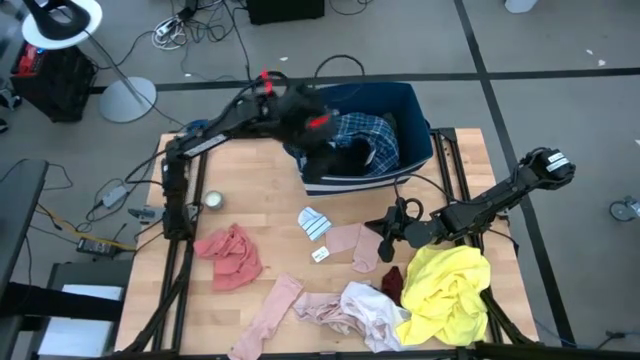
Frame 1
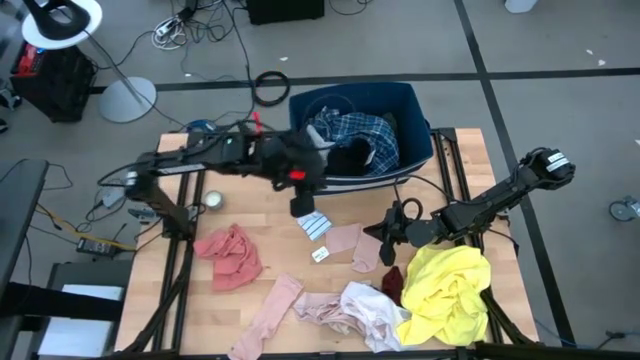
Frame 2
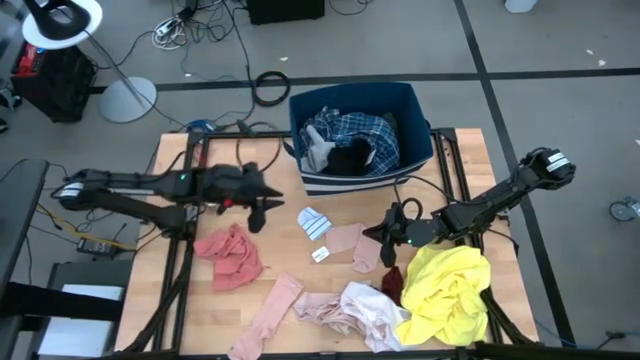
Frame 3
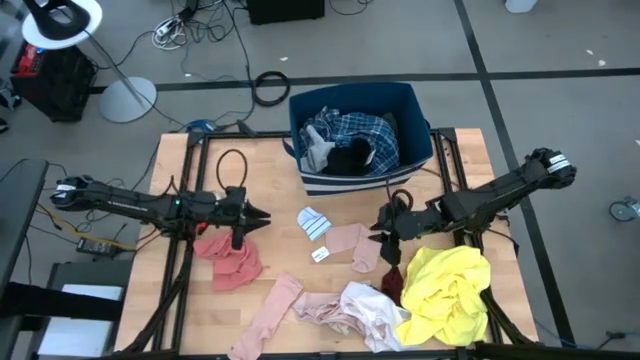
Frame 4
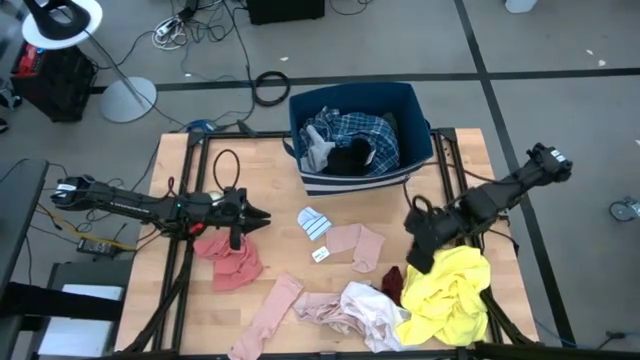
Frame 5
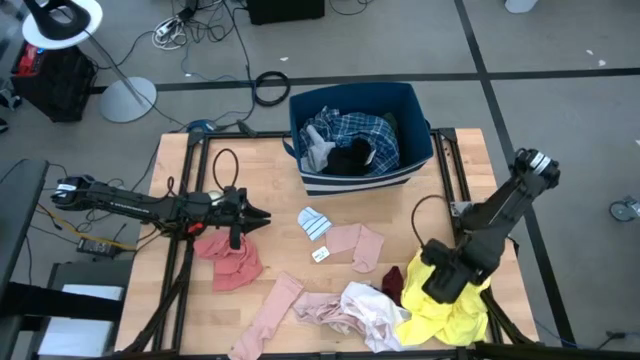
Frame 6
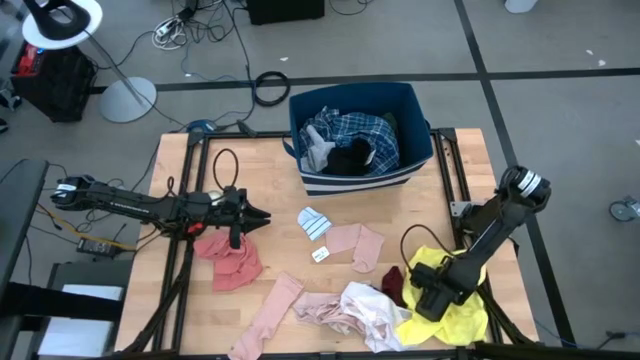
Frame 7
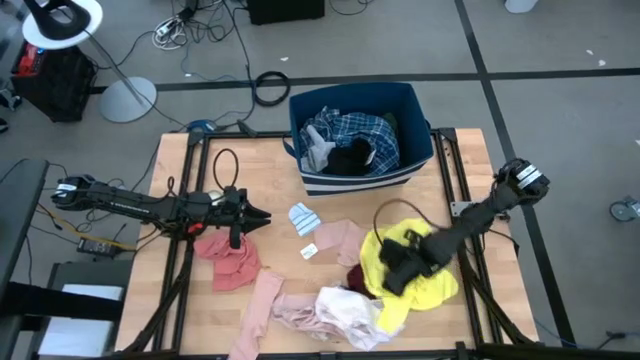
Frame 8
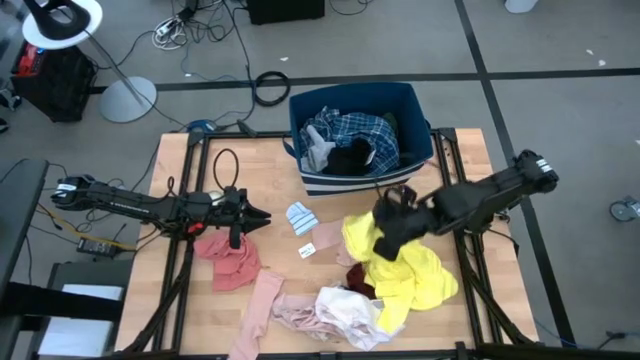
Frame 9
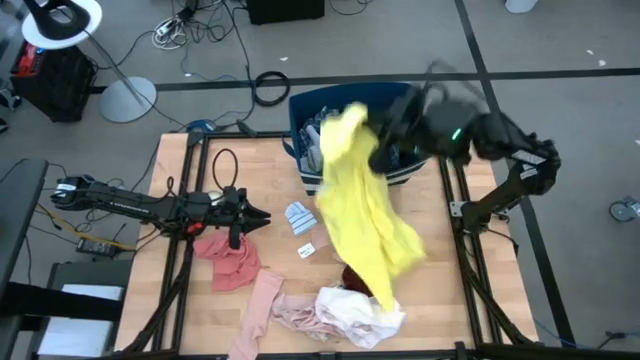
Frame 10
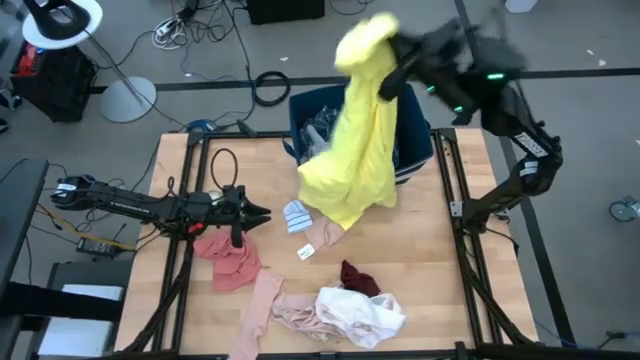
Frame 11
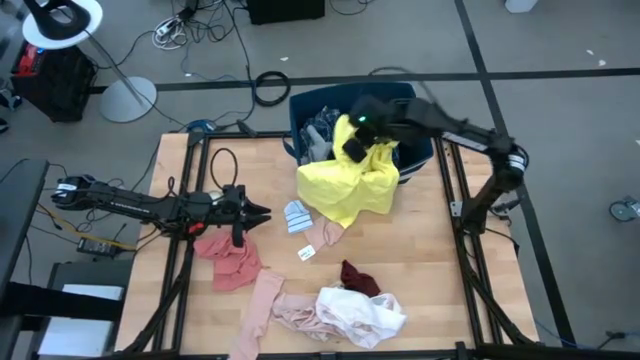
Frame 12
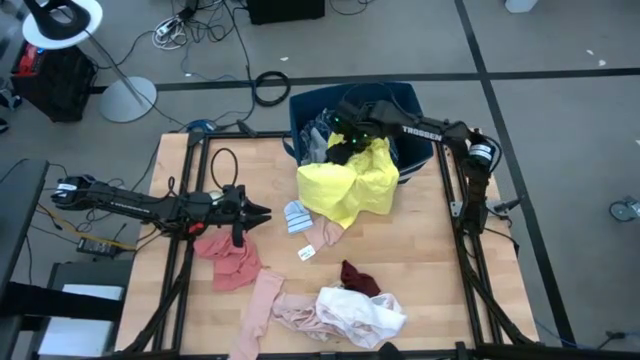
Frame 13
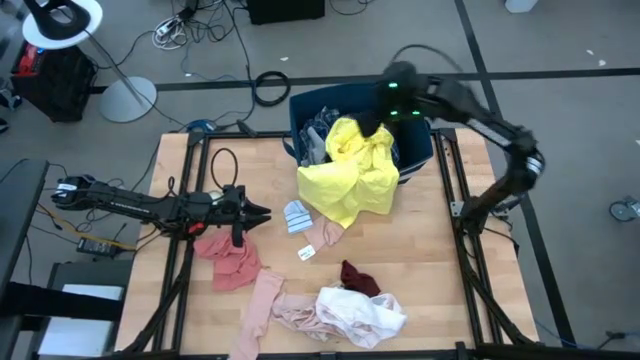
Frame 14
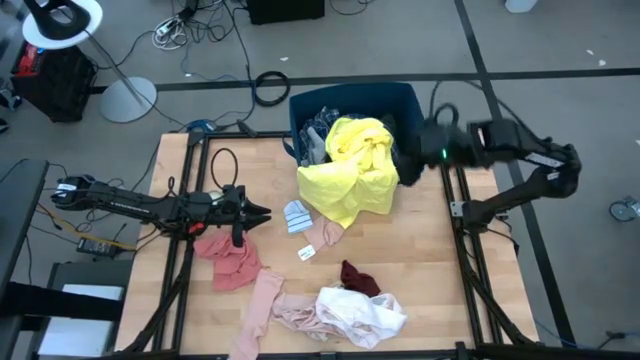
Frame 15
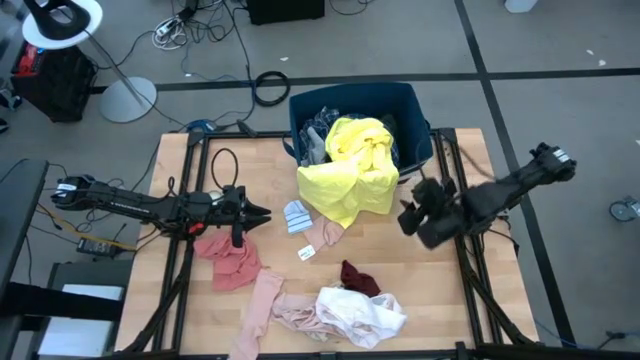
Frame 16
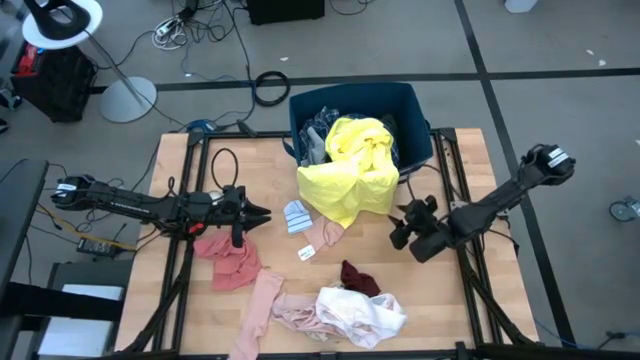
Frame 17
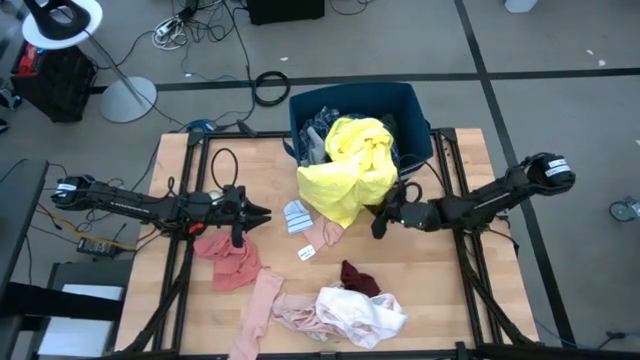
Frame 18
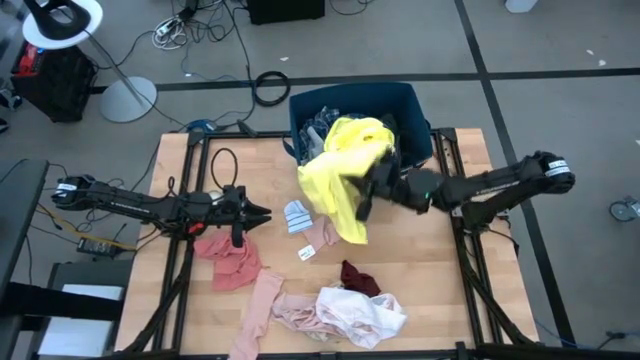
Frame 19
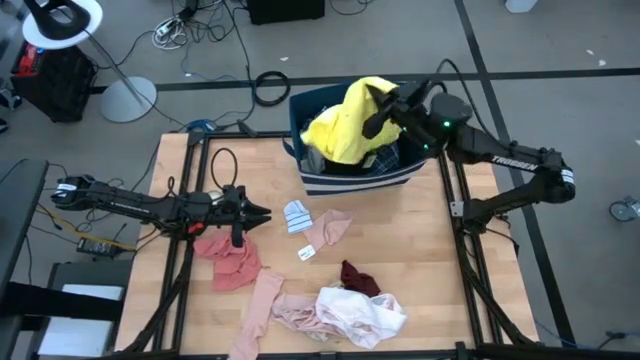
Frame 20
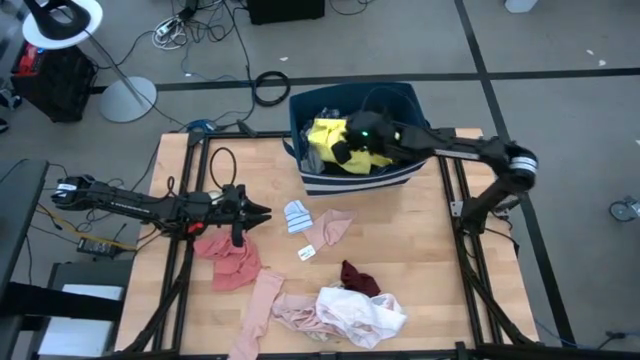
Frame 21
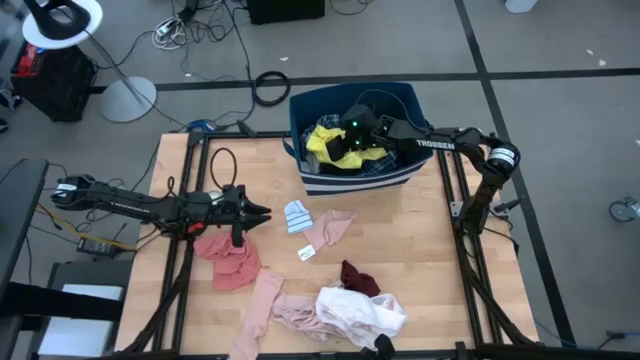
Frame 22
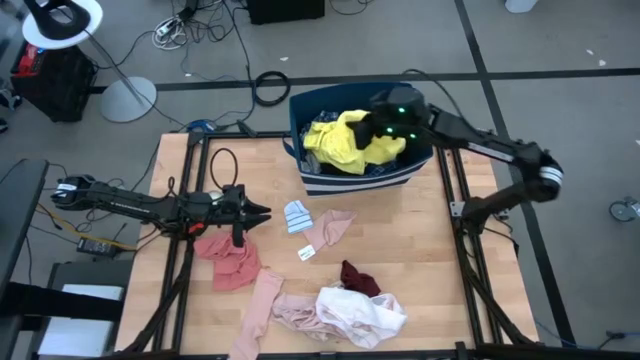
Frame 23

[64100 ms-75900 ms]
Task: Sort clothes
Put the yellow shirt into the blue laundry bin

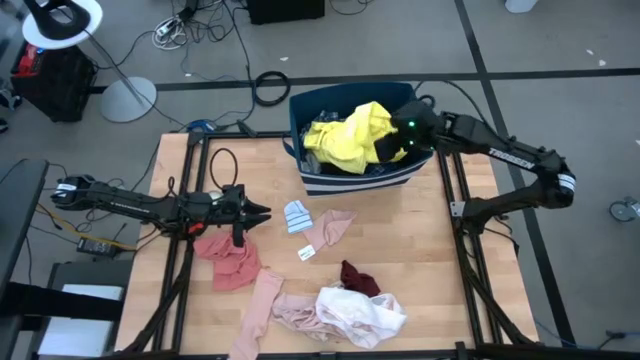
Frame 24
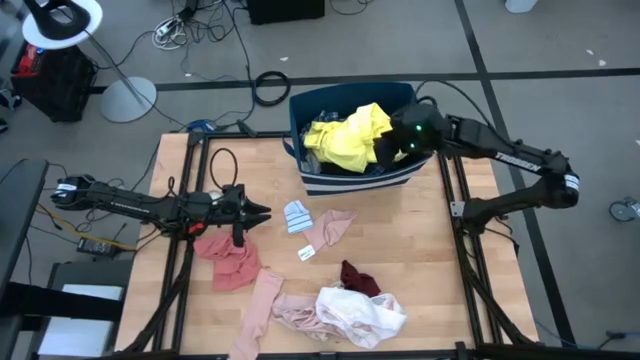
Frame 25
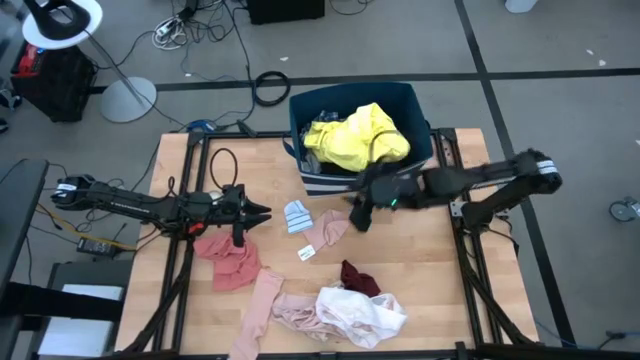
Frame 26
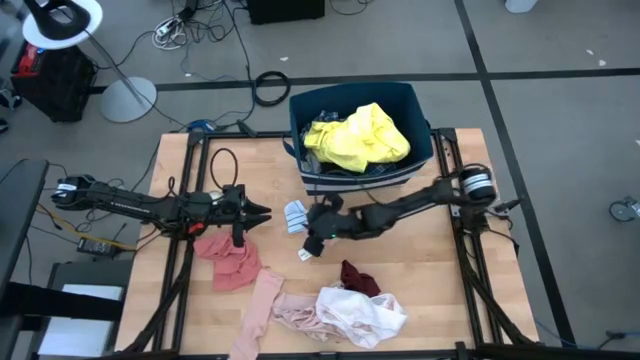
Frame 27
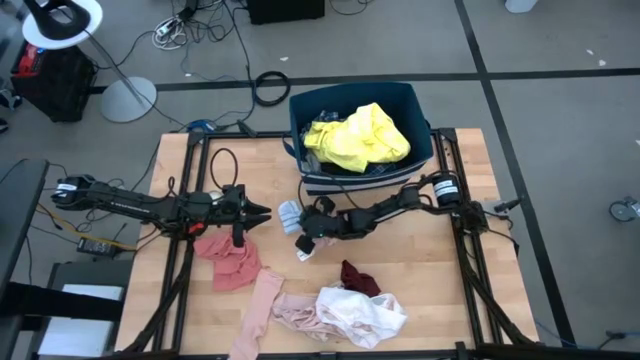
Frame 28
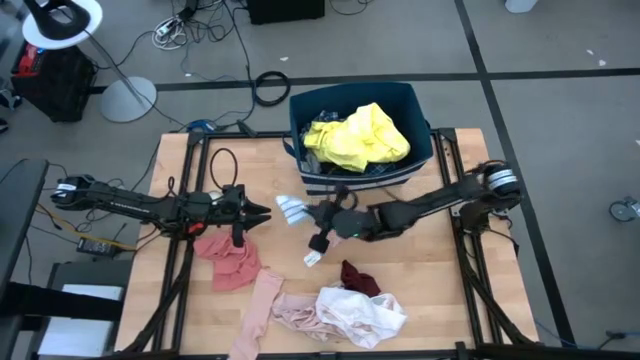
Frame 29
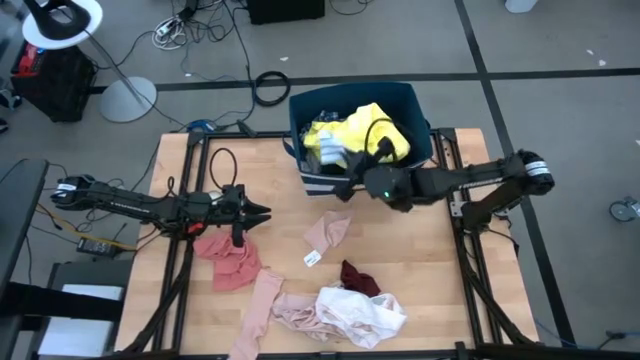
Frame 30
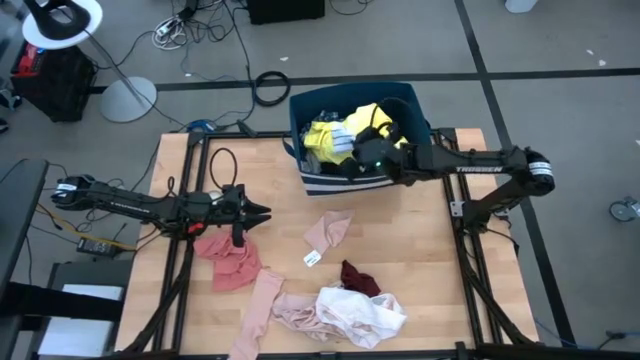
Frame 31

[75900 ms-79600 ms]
Put the white striped sock into the blue laundry bin

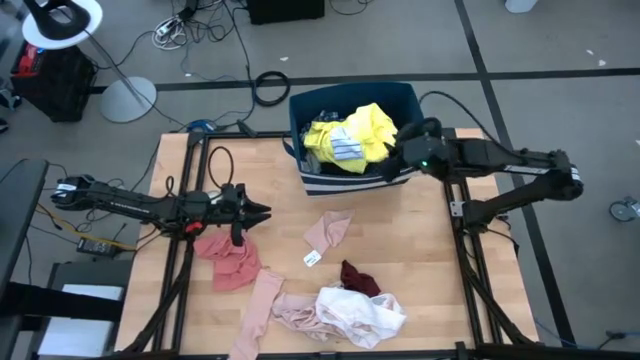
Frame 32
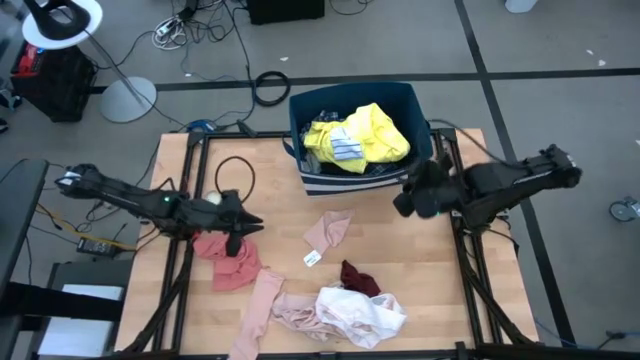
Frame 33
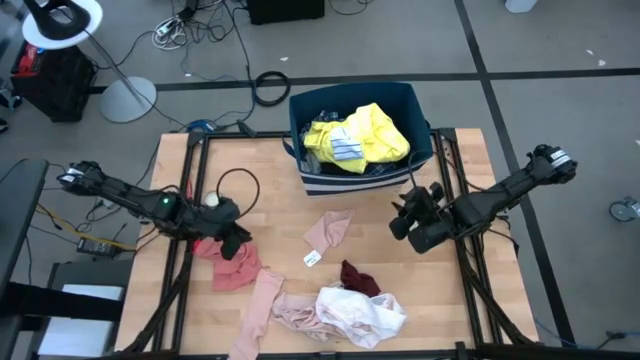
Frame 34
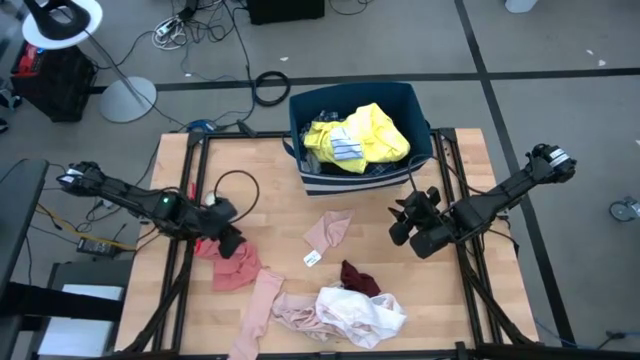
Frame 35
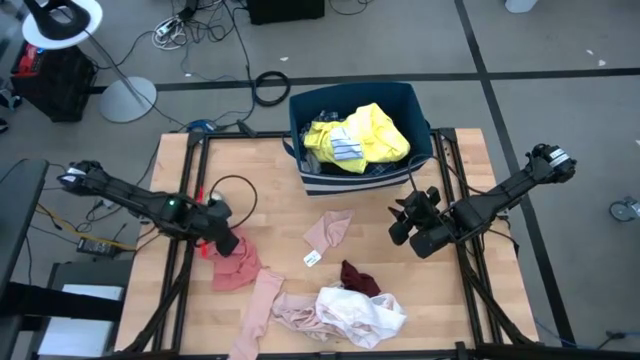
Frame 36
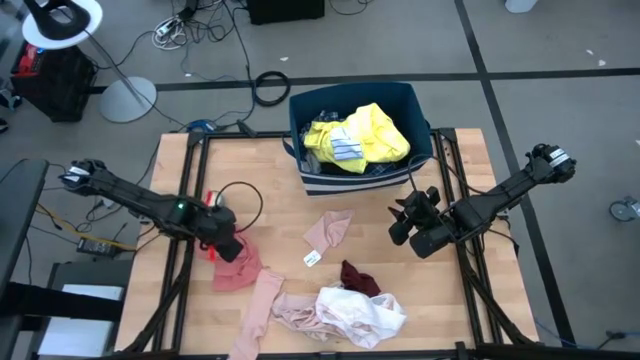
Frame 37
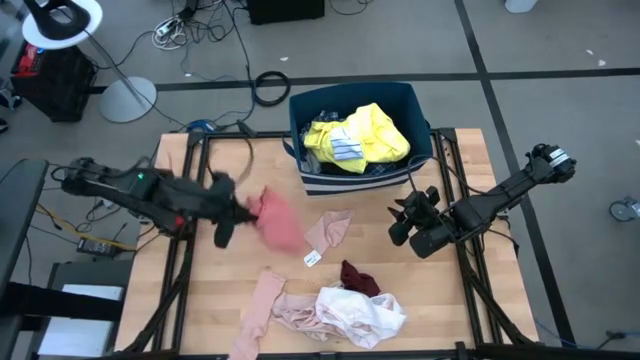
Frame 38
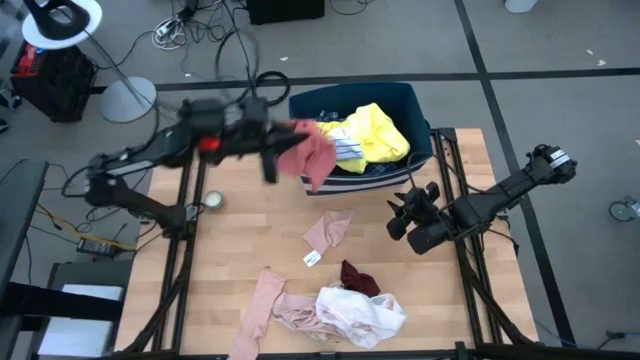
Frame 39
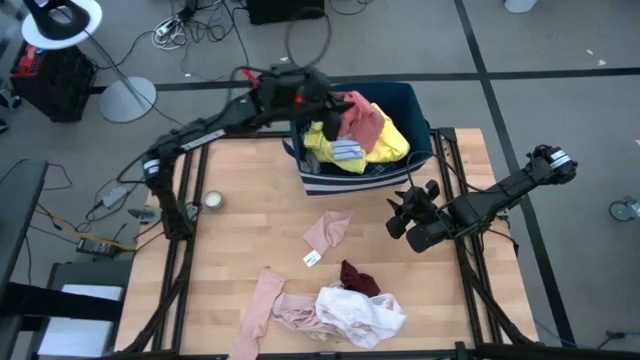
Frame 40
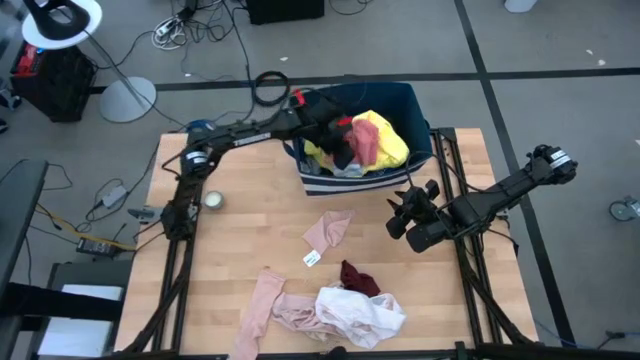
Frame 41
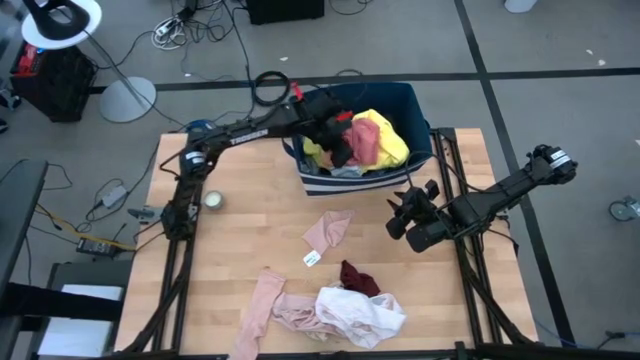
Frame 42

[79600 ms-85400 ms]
Put the pink shirt into the blue laundry bin
